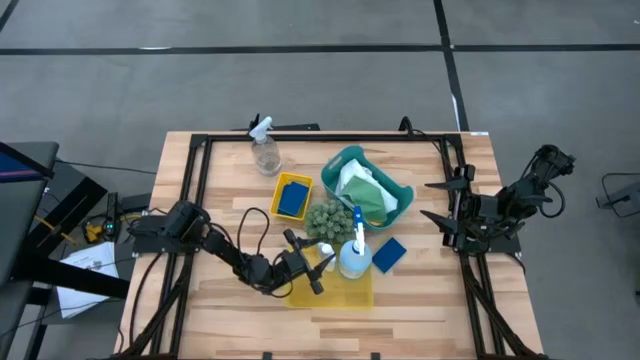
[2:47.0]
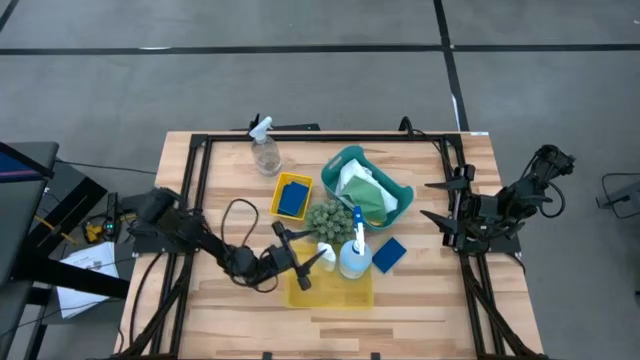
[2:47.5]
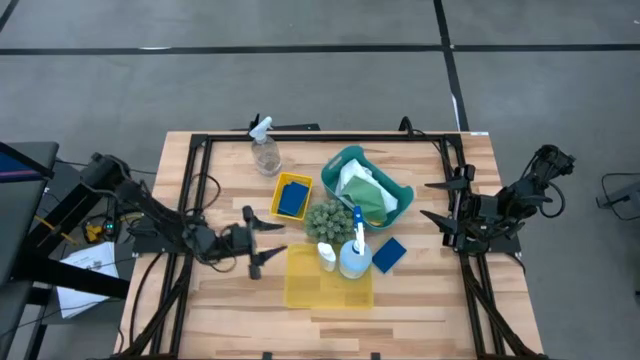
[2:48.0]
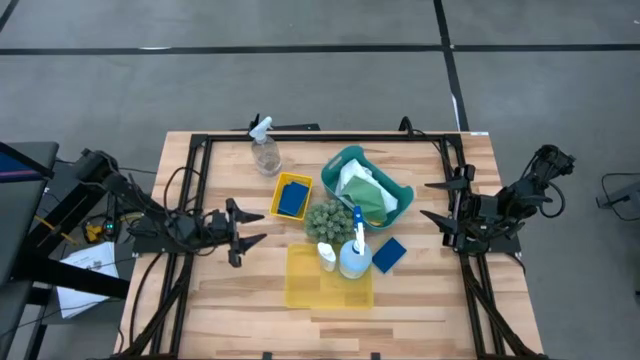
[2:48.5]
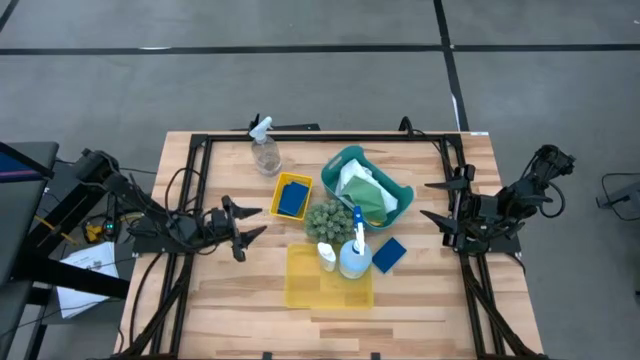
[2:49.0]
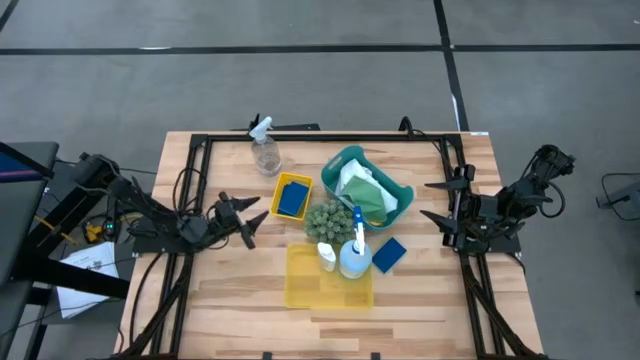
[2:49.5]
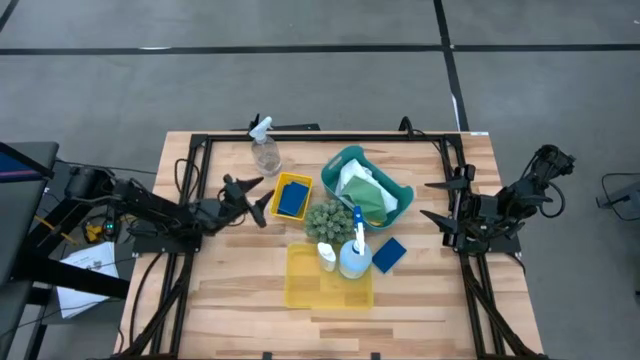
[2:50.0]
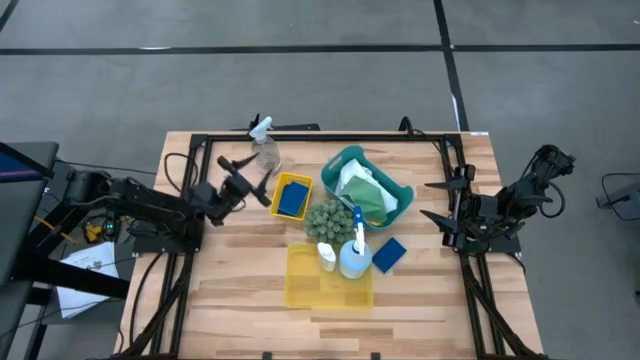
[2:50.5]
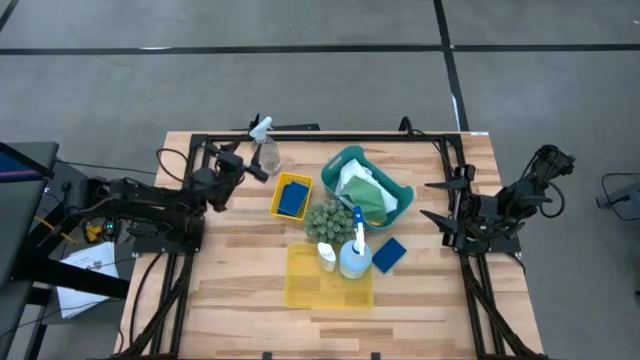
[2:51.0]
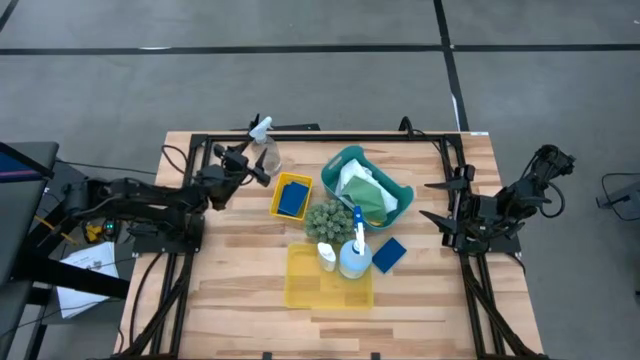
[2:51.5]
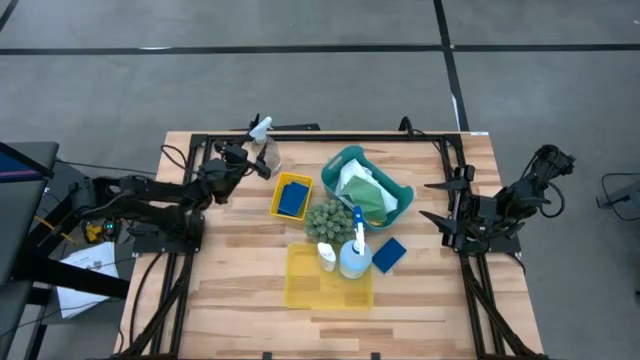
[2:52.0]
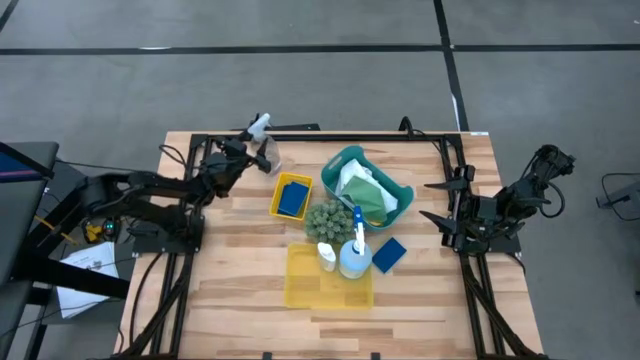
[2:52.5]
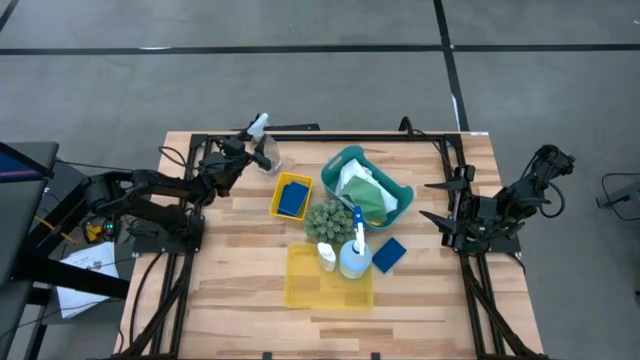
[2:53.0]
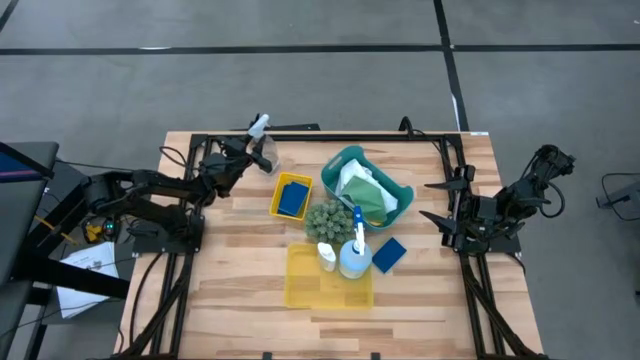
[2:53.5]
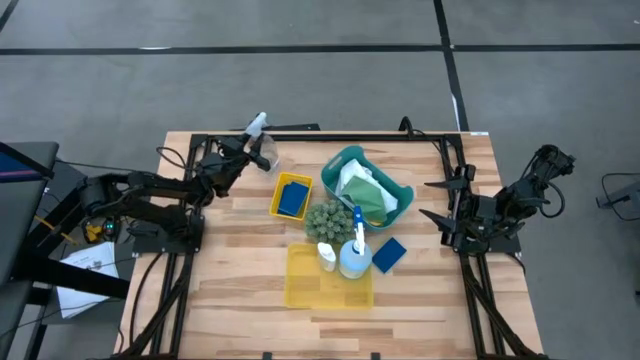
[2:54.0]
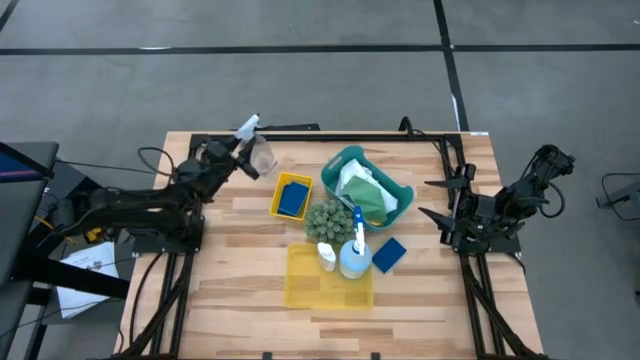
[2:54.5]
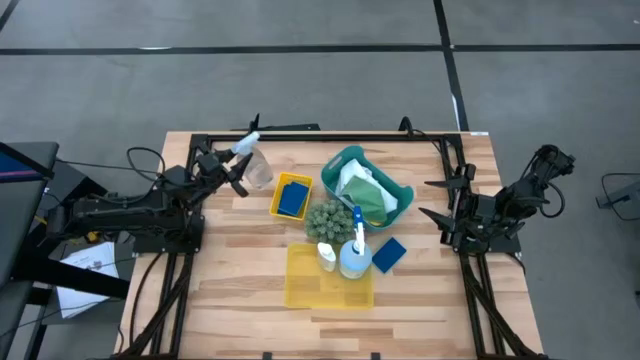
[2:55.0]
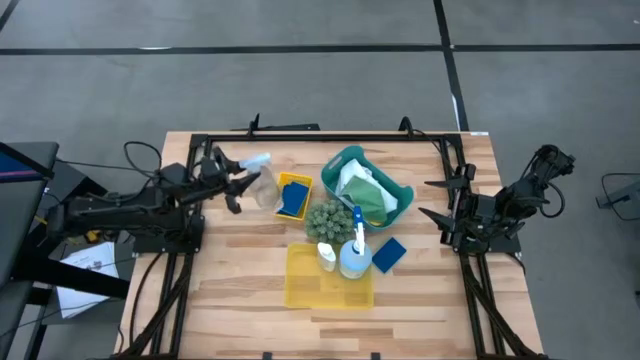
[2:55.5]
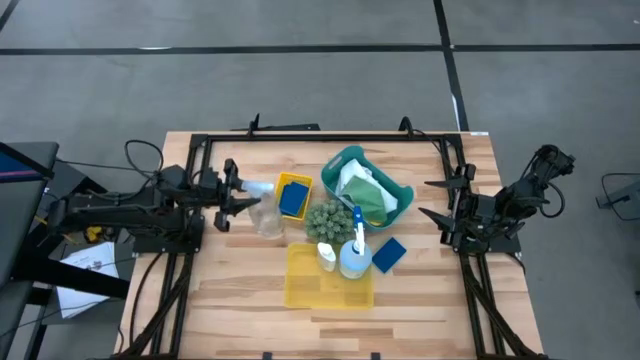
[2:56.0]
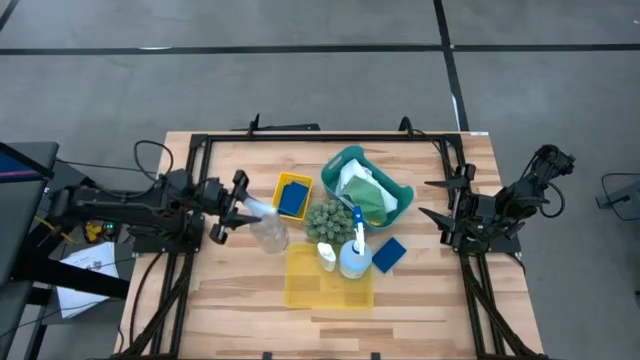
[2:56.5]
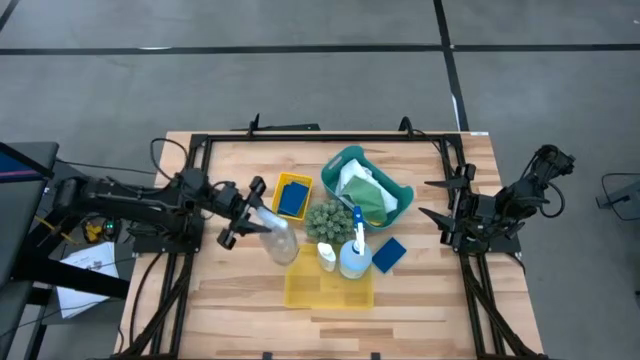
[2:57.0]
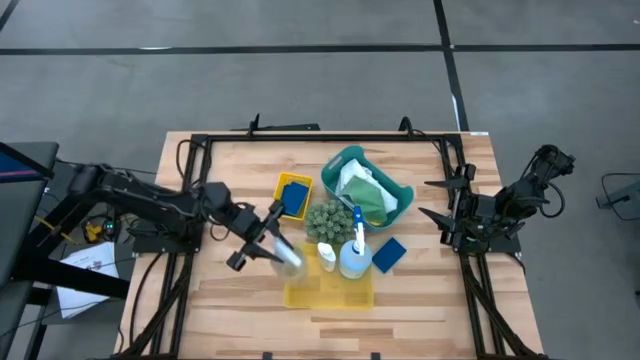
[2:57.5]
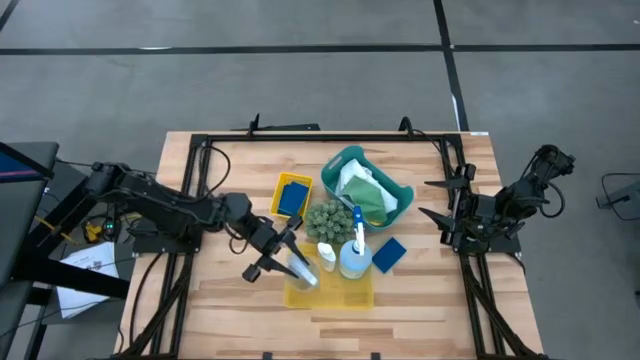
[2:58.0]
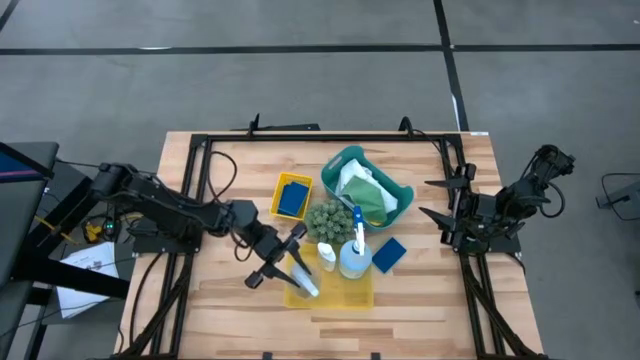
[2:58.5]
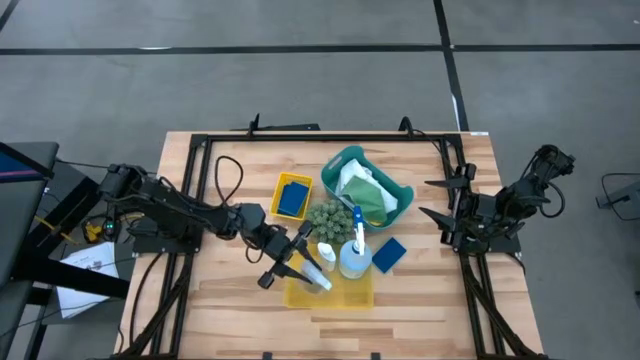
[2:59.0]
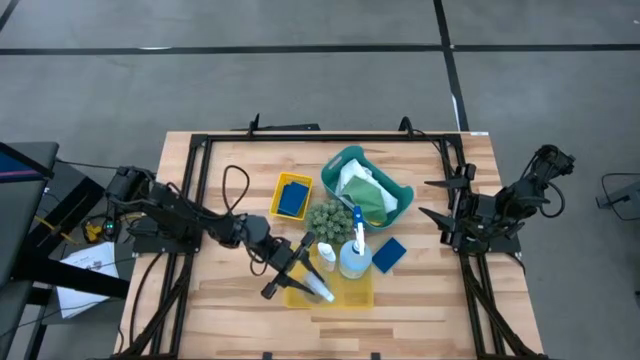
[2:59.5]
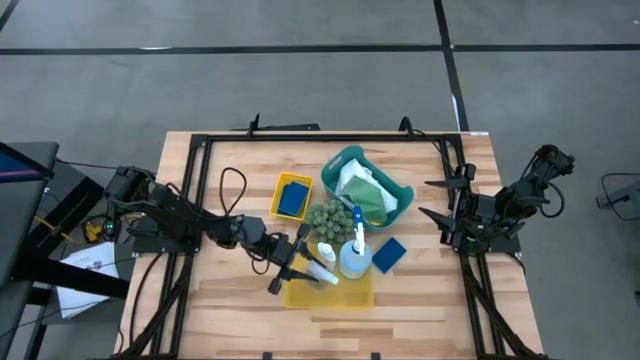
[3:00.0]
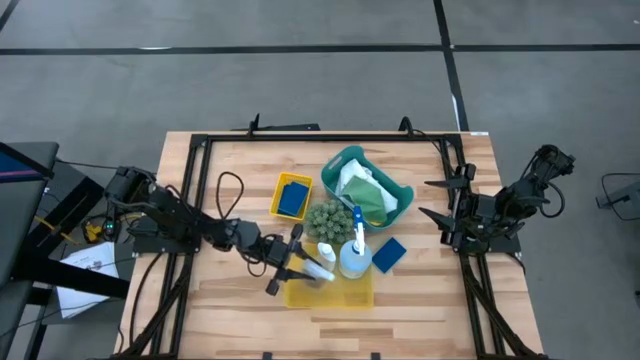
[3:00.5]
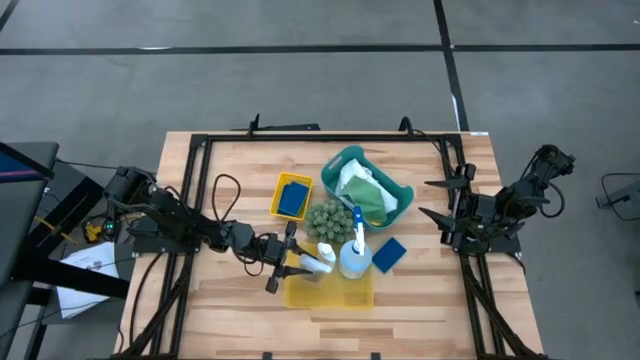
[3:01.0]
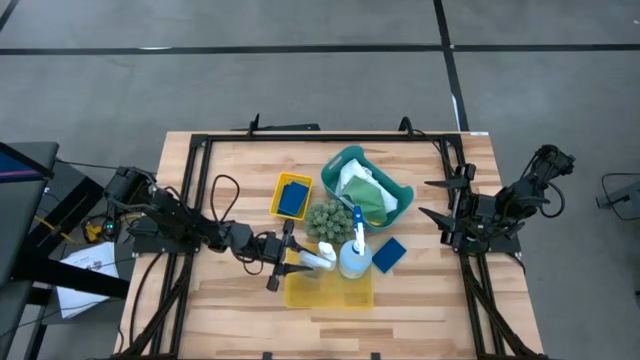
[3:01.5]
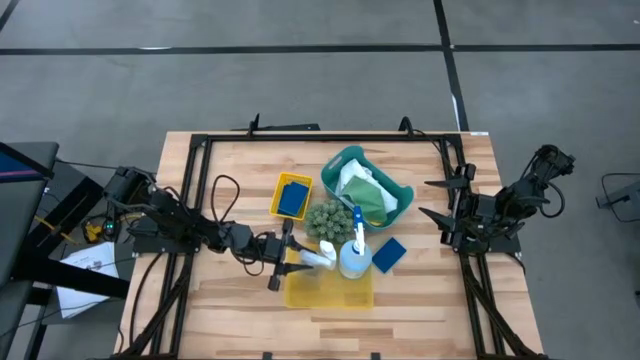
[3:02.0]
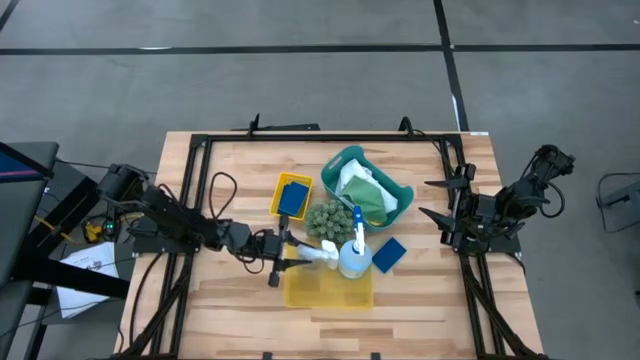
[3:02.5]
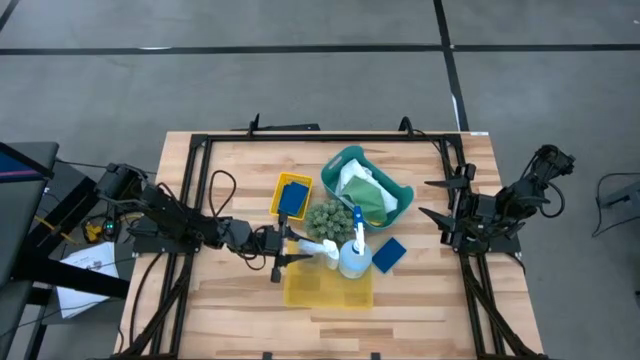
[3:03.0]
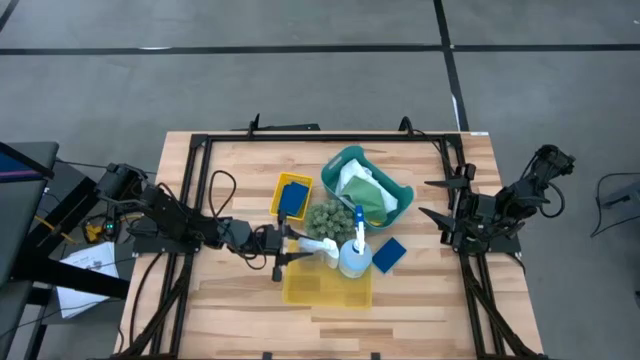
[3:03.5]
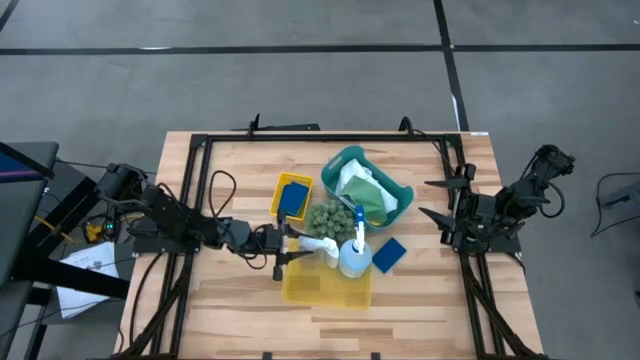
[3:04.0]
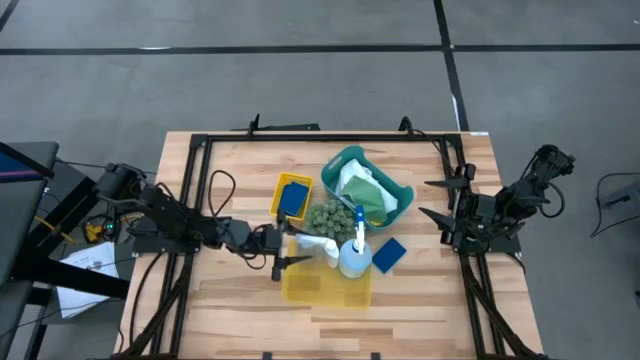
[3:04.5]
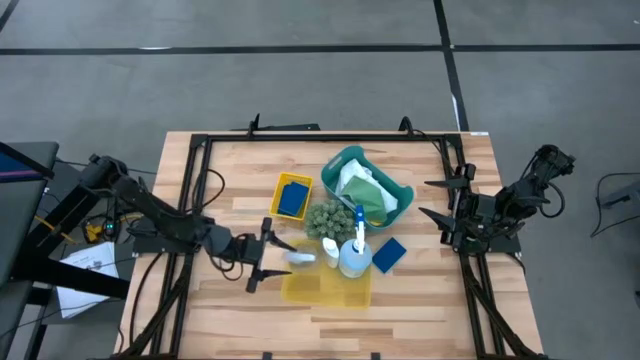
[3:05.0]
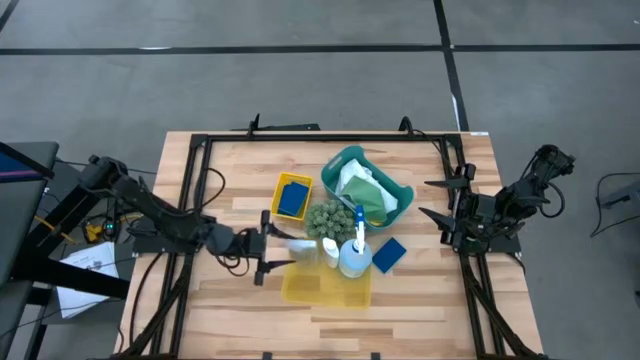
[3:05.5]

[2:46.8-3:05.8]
Task: Pick & Place Kitchen Items
Put the transparent spray bottle into the bottom yellow bin
